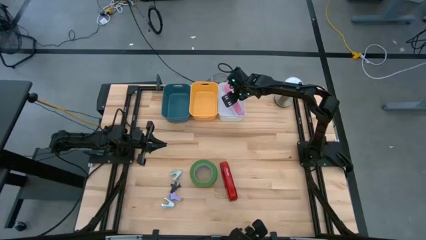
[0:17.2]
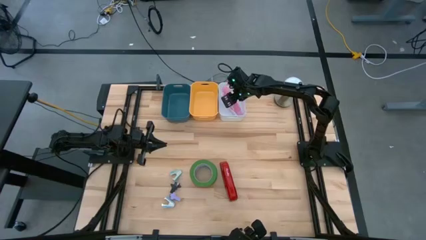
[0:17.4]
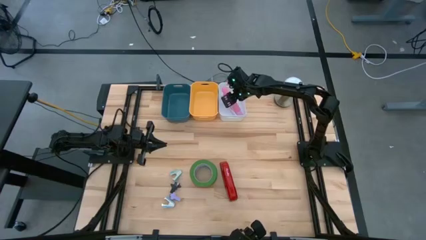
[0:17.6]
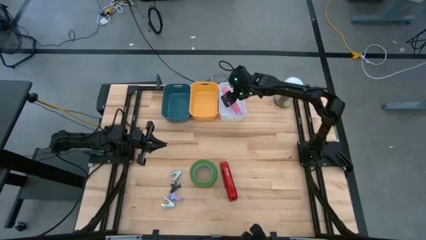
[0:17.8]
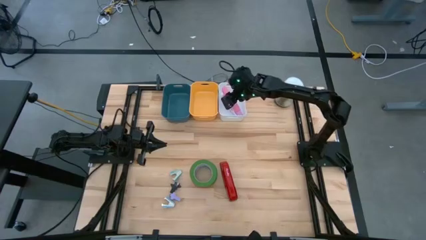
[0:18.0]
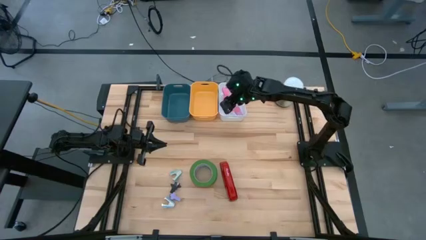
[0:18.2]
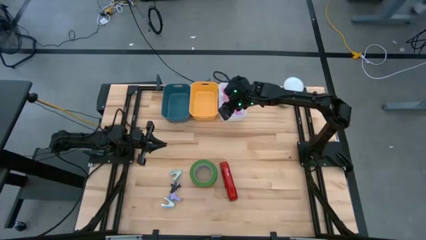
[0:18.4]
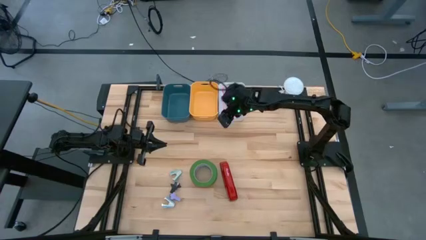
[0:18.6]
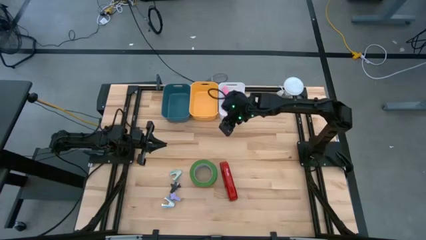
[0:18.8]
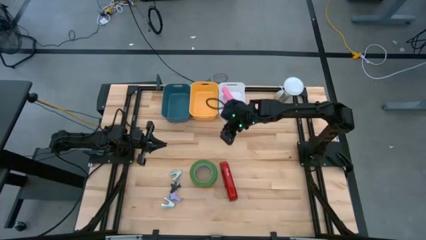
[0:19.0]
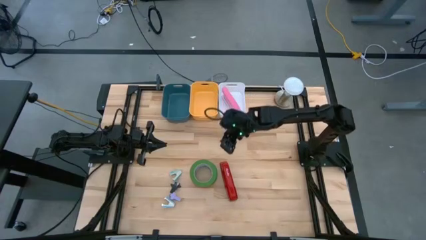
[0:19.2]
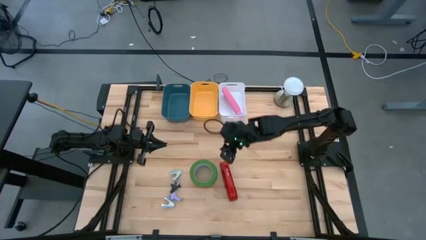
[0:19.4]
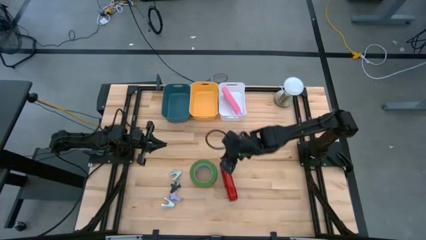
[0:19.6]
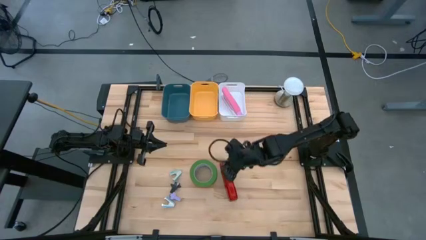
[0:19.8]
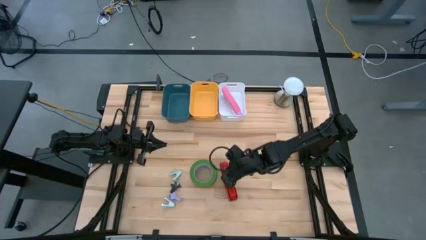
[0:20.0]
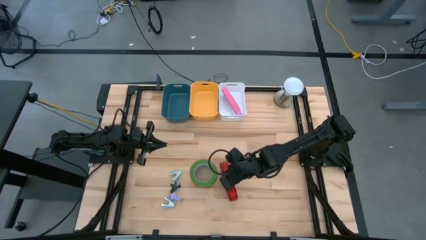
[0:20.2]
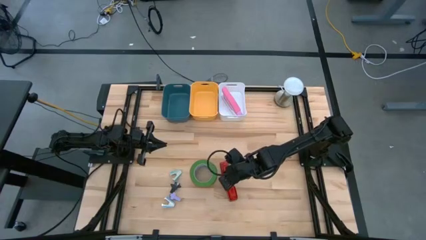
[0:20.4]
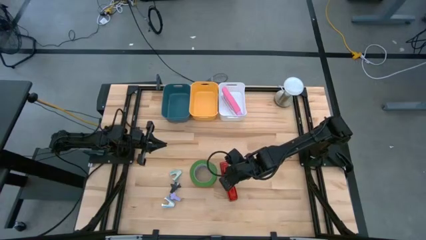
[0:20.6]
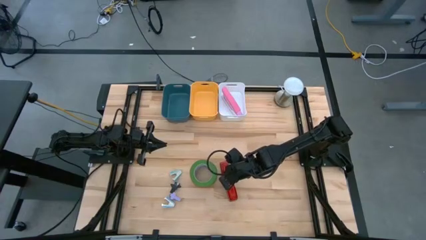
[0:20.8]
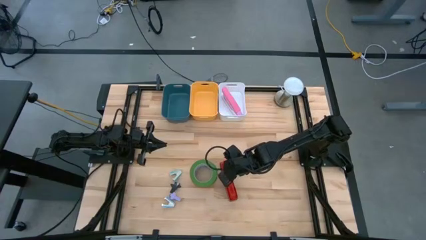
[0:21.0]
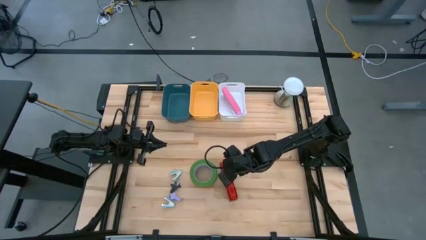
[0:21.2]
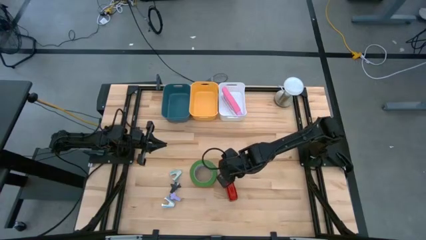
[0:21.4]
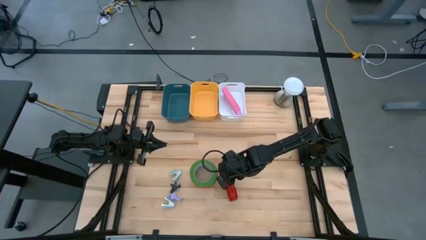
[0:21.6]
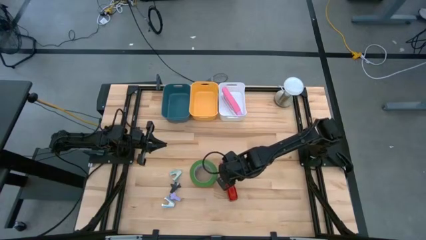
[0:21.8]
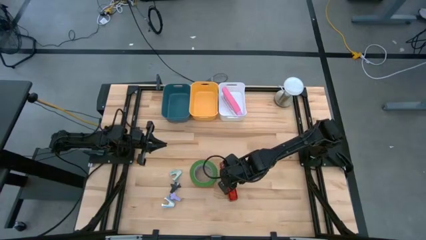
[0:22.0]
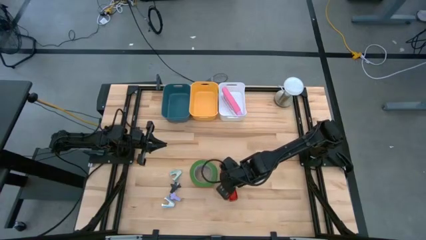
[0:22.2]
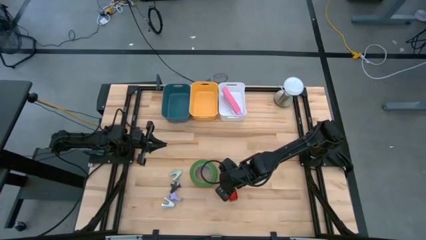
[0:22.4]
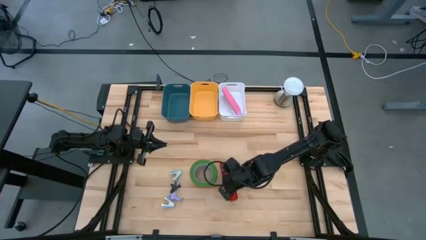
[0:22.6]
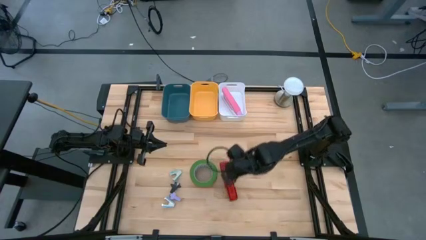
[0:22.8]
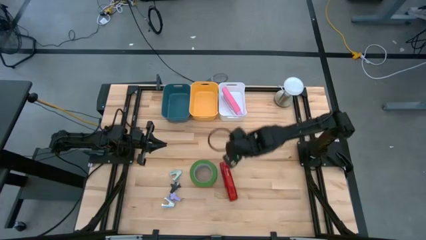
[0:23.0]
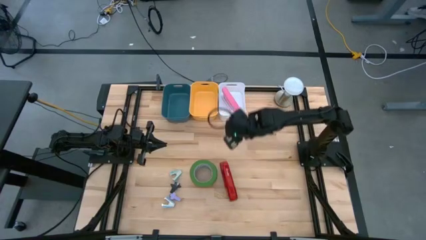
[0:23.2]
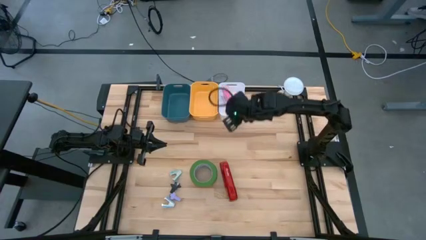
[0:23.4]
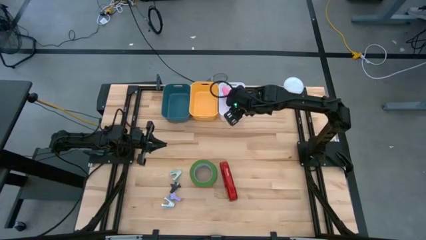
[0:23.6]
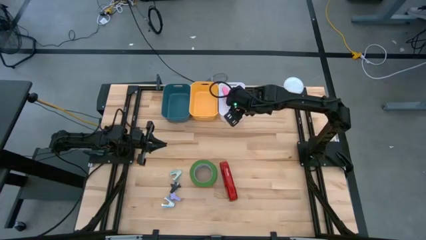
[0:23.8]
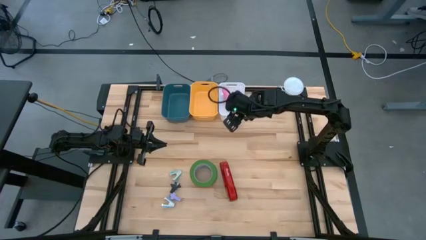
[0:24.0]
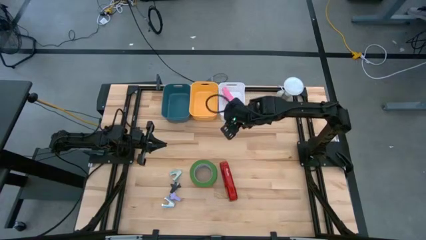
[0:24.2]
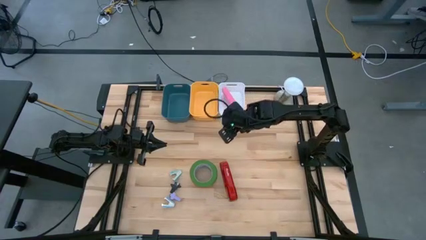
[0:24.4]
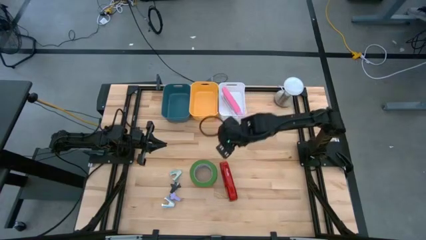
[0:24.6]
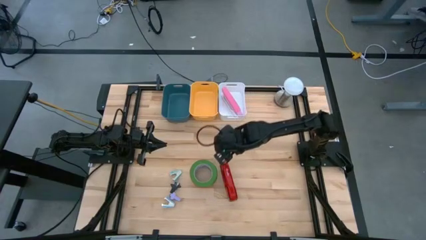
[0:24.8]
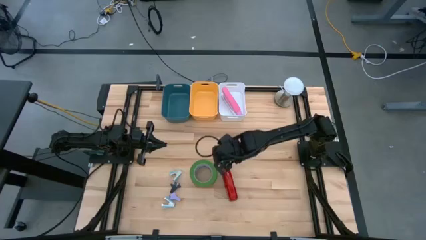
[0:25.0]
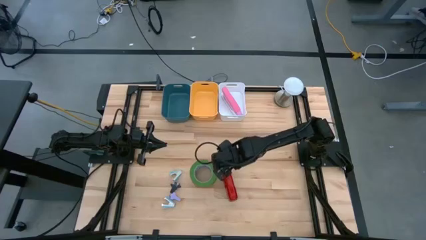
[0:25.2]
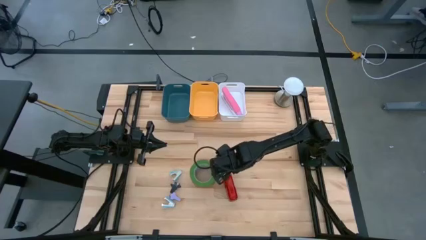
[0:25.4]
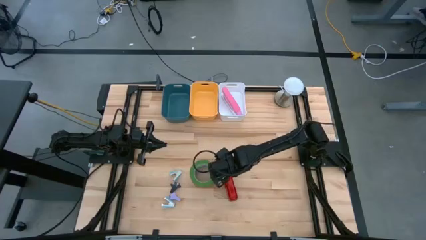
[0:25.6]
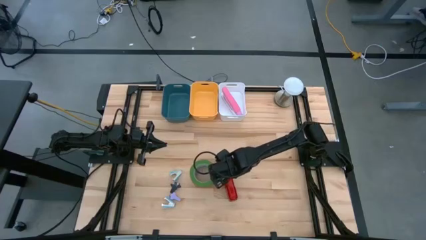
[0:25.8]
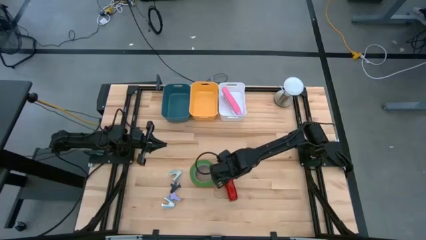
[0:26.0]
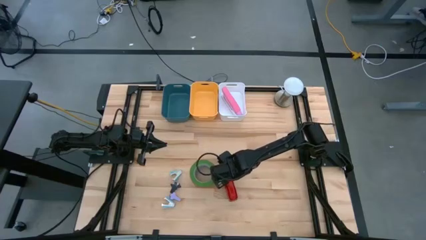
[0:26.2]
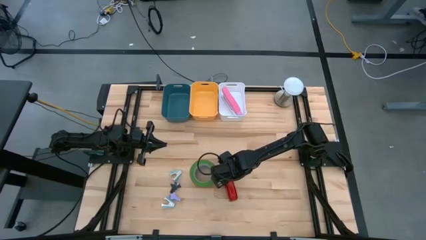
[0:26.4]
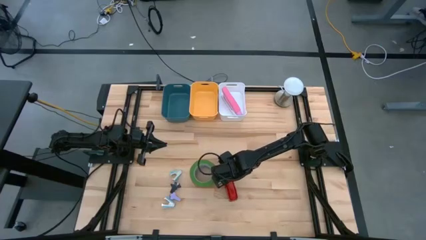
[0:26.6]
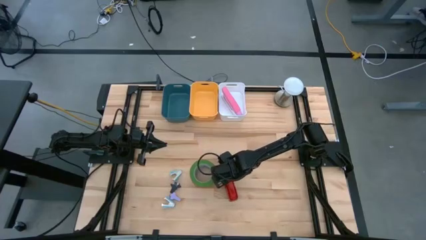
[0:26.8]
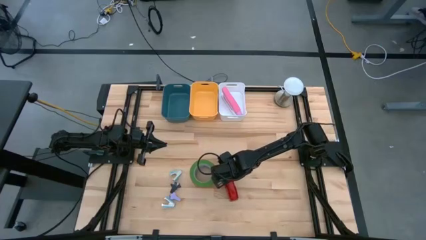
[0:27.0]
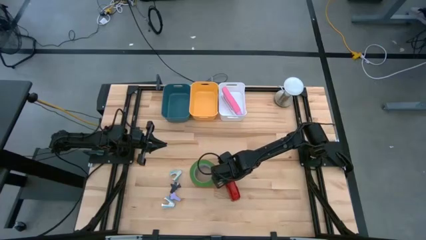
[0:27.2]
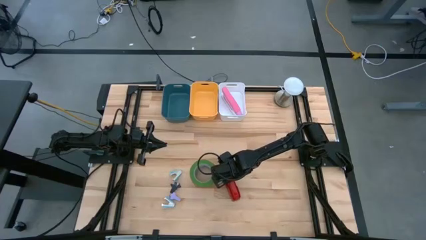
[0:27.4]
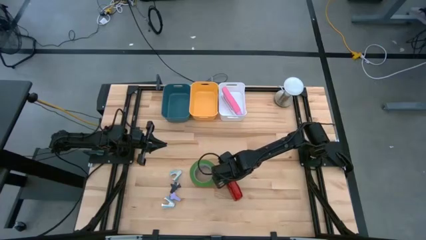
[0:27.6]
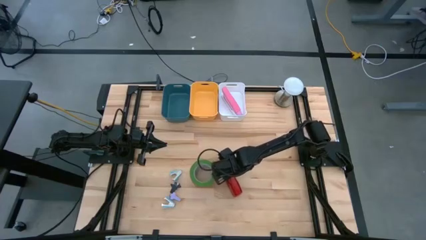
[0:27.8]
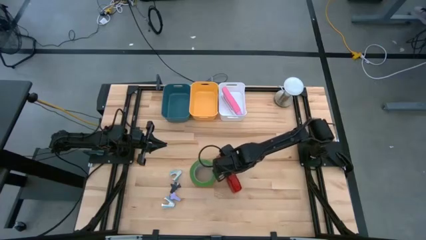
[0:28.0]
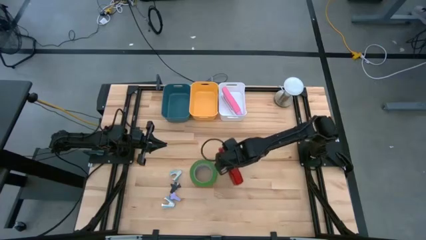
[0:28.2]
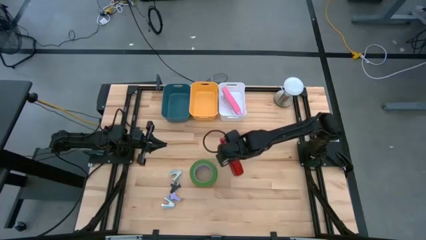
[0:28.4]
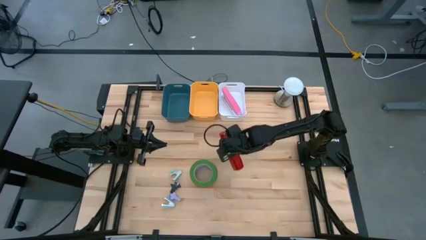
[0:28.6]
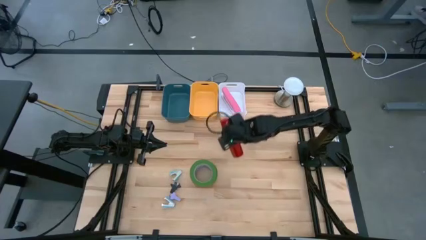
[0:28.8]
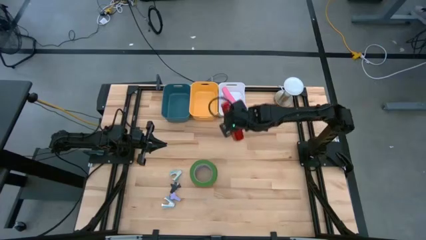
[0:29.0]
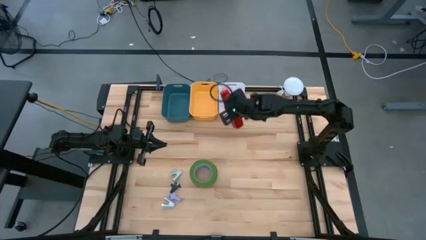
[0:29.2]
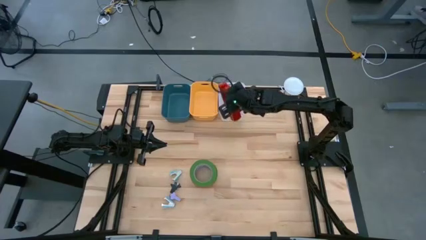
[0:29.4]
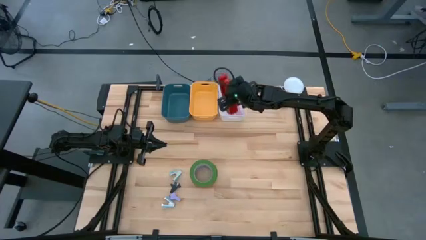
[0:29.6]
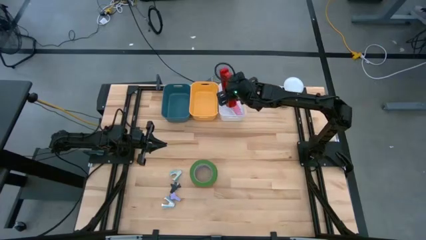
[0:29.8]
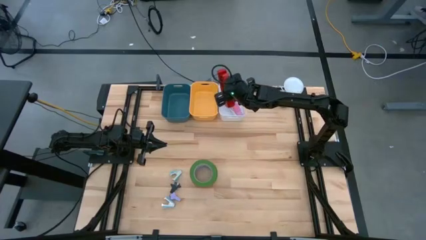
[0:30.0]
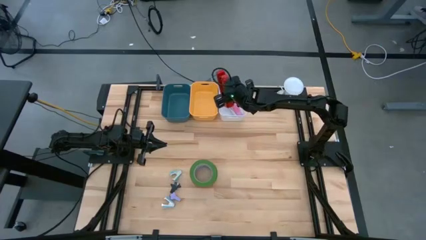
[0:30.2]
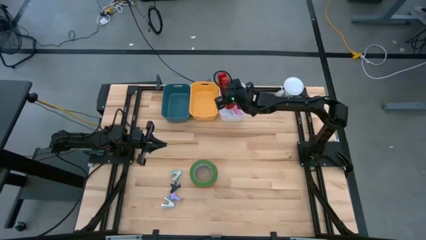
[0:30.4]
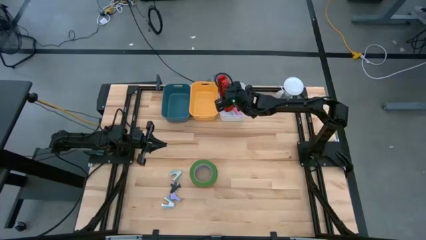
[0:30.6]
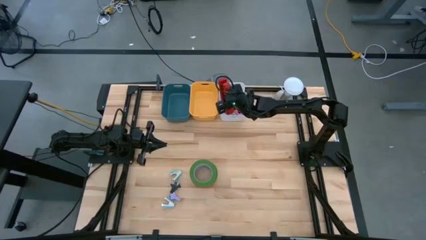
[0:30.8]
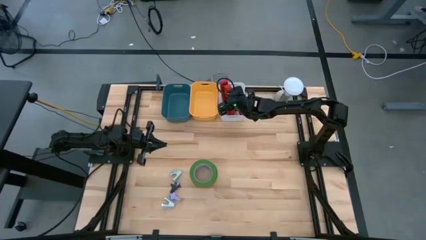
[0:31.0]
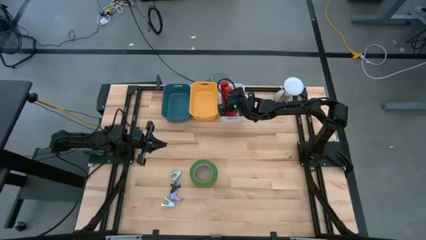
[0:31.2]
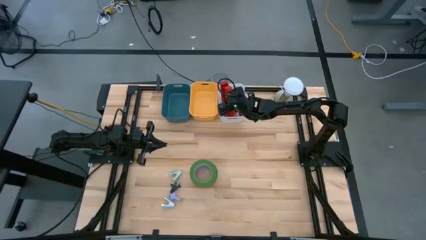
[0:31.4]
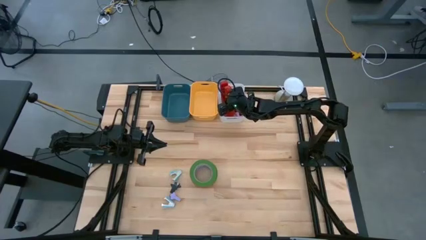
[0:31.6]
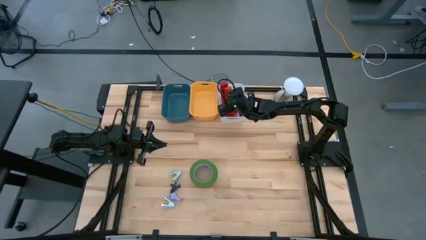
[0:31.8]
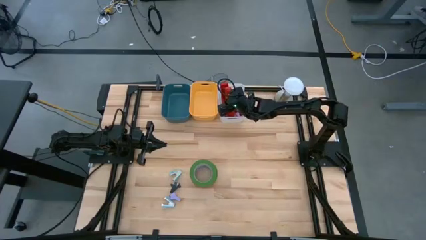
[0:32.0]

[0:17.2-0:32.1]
Task: Pick and place Stapler, Stapler remover, tape
Put the red stapler into the white bin

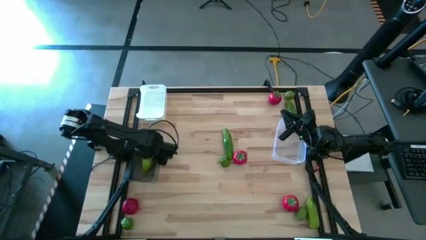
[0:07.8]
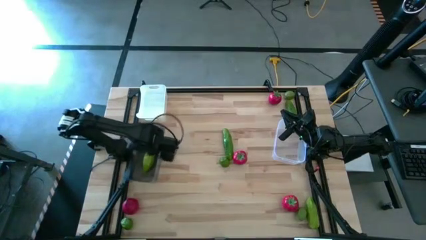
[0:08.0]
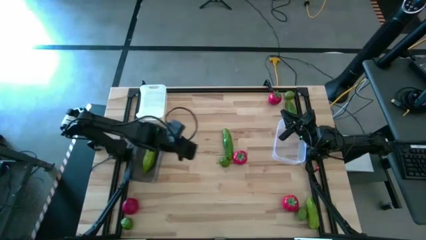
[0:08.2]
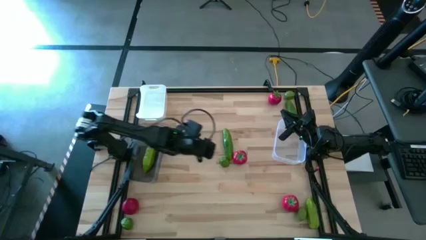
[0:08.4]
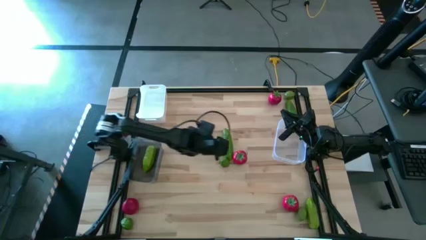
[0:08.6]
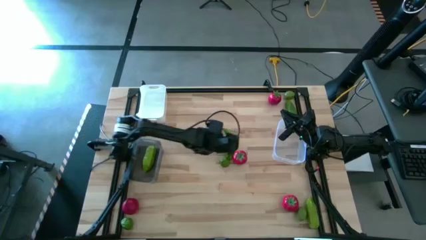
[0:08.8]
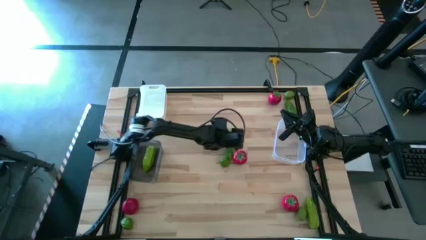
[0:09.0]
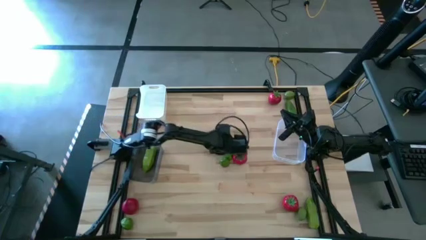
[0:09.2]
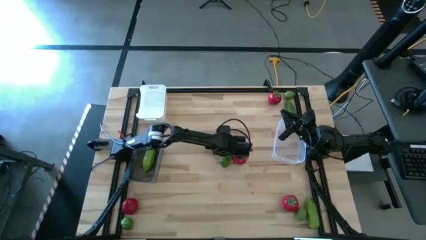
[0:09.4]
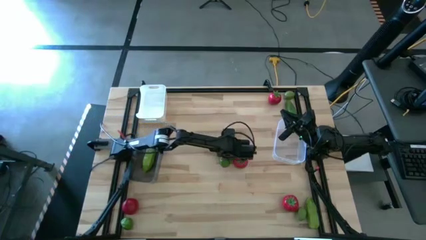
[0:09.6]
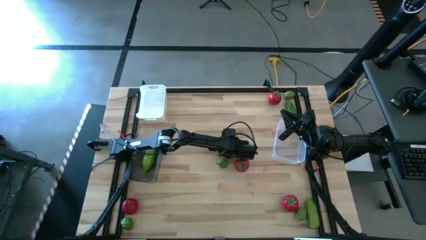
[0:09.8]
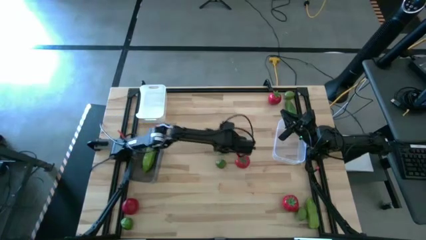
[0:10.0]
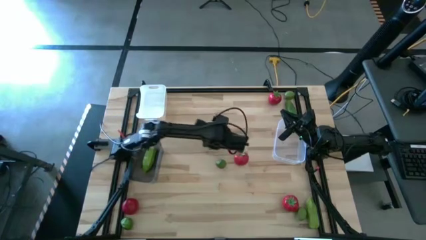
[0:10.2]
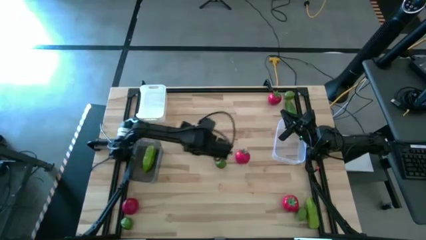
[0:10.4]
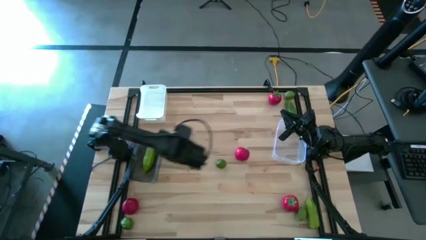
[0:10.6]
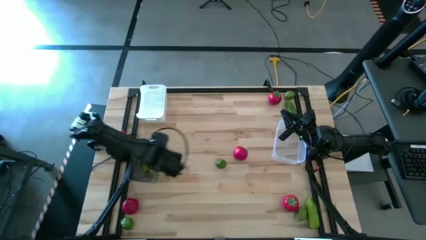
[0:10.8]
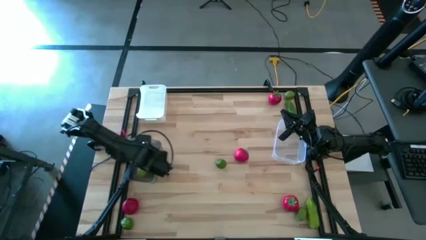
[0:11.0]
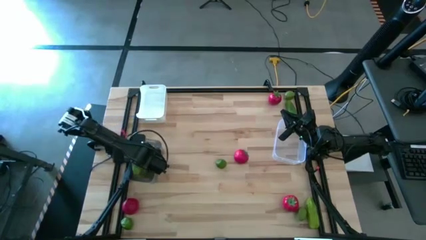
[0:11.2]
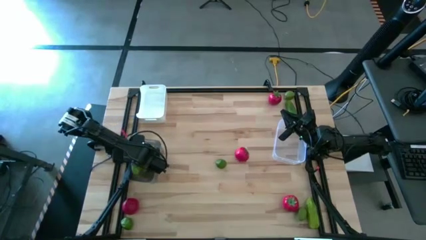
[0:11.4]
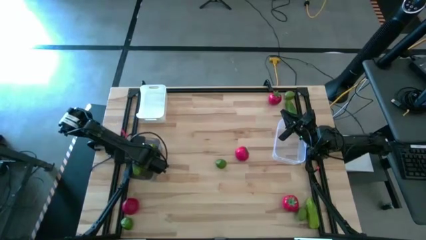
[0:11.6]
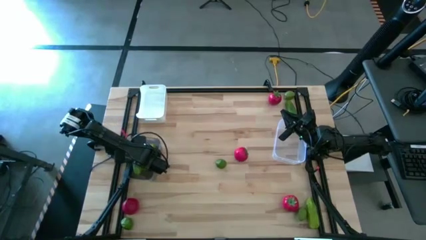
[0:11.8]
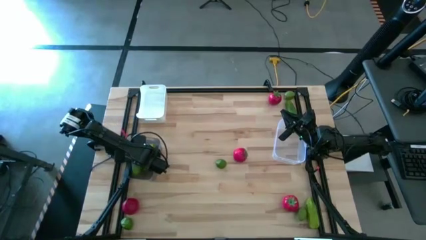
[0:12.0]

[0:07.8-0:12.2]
Task: Sort produce into baskets
Put the cucumber into the black bin
